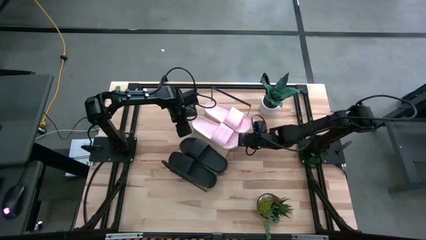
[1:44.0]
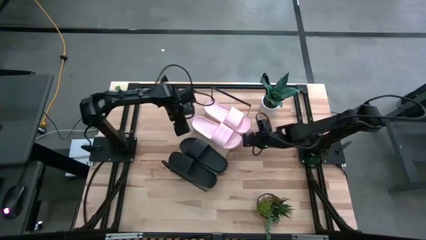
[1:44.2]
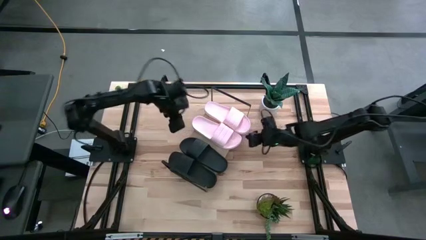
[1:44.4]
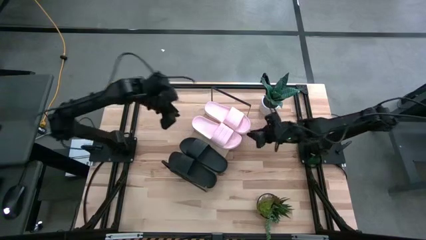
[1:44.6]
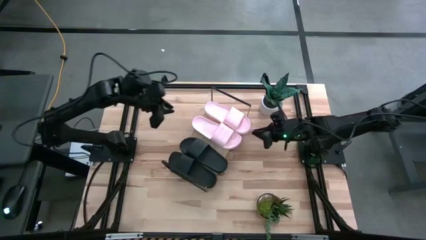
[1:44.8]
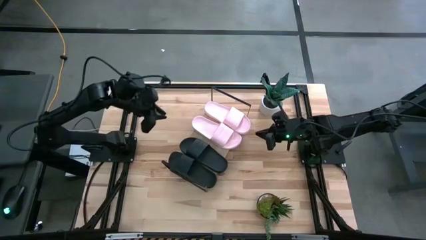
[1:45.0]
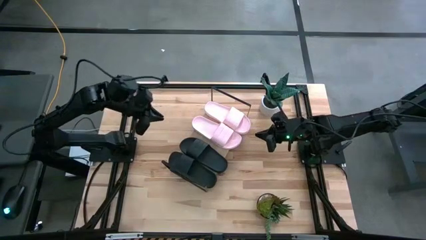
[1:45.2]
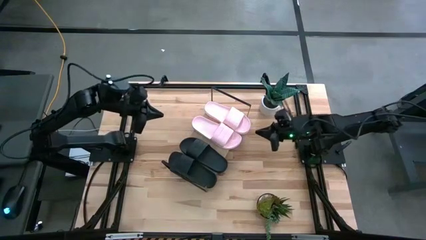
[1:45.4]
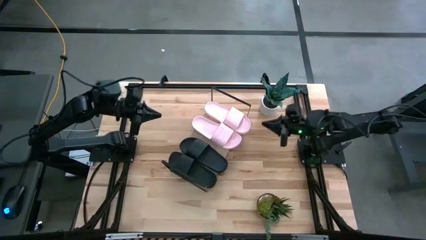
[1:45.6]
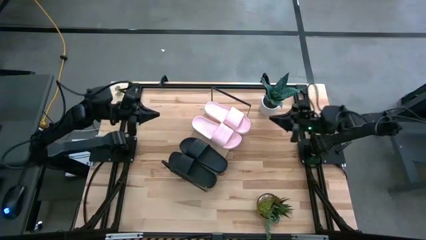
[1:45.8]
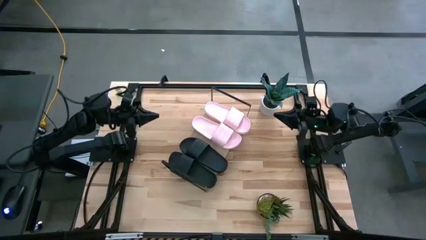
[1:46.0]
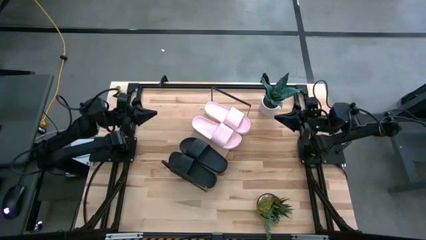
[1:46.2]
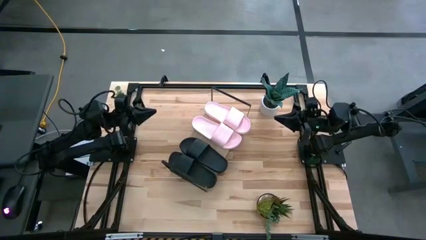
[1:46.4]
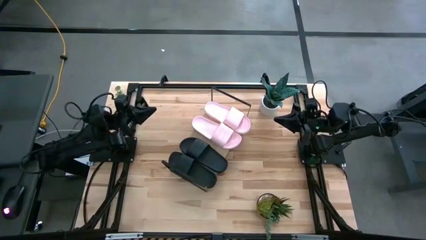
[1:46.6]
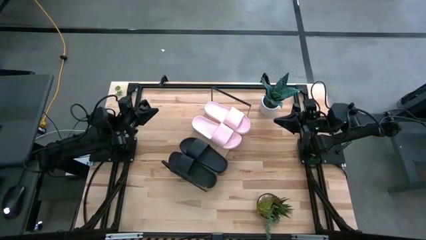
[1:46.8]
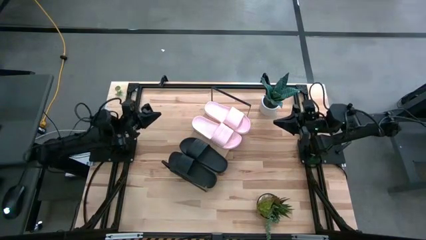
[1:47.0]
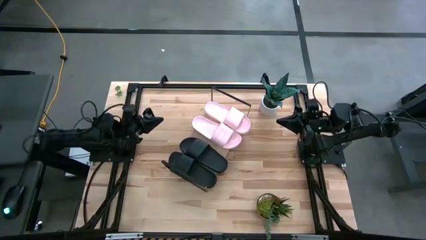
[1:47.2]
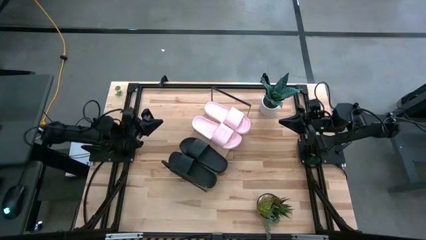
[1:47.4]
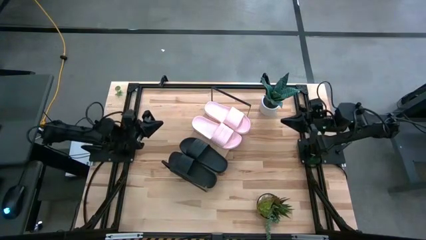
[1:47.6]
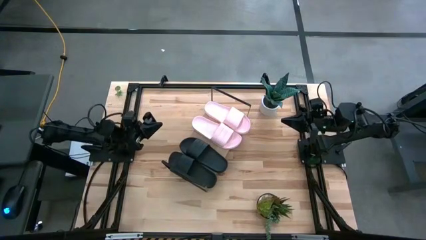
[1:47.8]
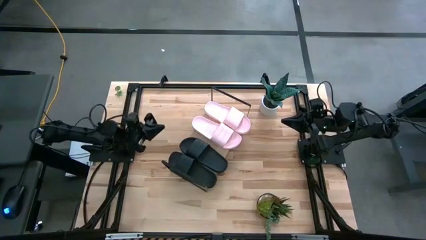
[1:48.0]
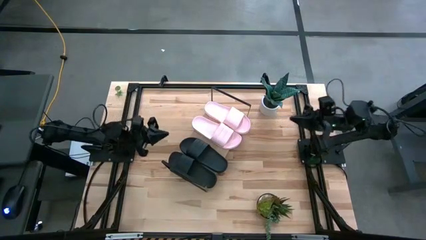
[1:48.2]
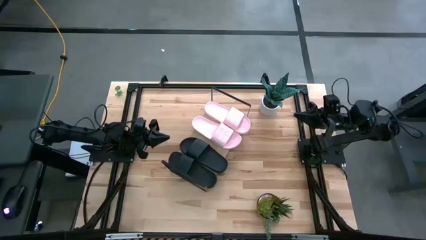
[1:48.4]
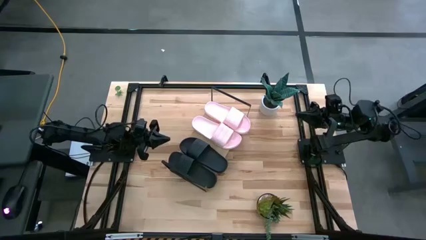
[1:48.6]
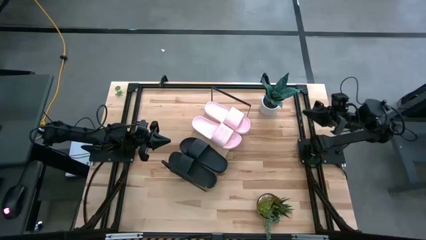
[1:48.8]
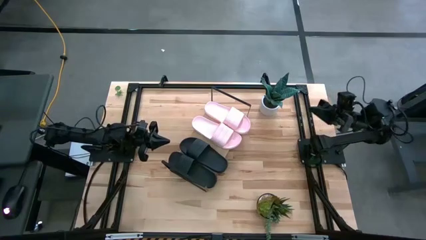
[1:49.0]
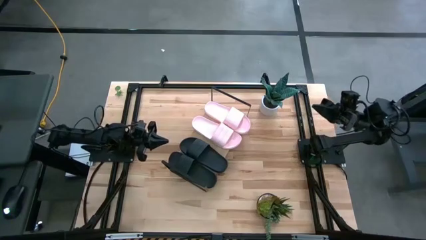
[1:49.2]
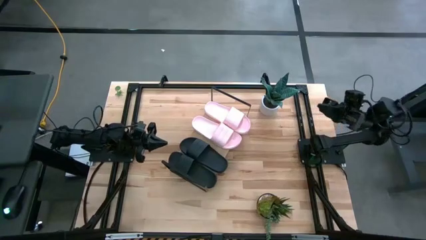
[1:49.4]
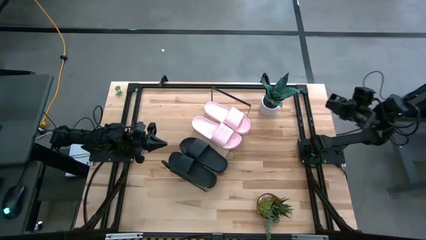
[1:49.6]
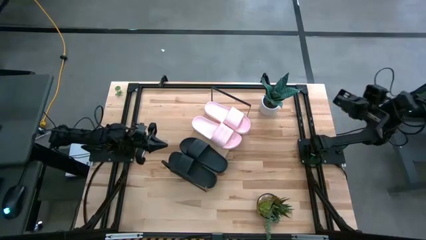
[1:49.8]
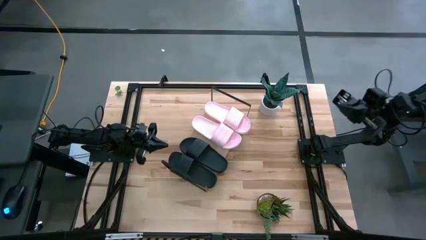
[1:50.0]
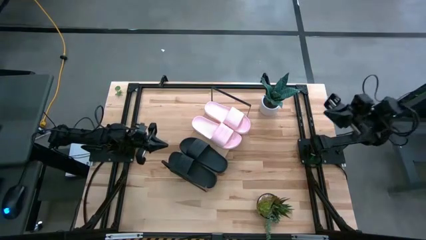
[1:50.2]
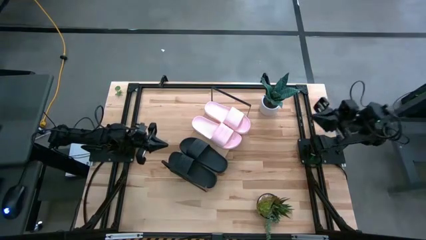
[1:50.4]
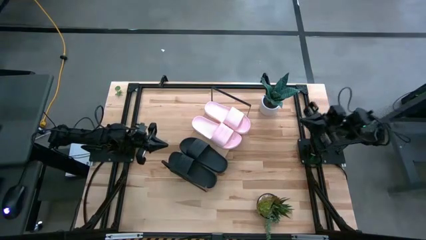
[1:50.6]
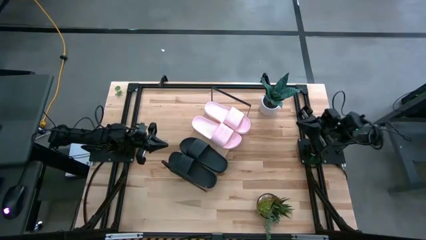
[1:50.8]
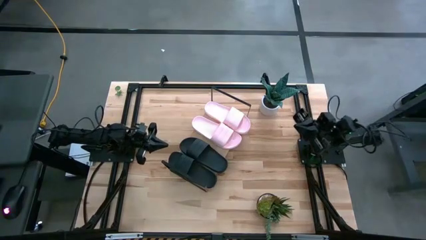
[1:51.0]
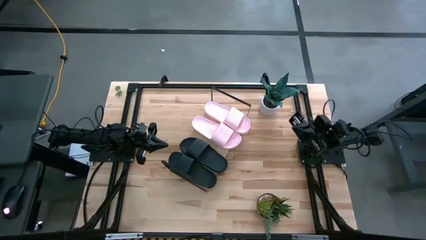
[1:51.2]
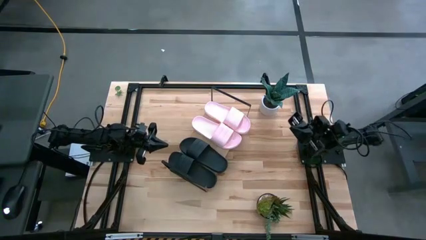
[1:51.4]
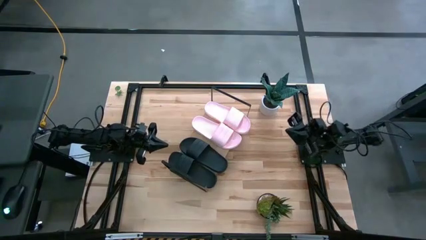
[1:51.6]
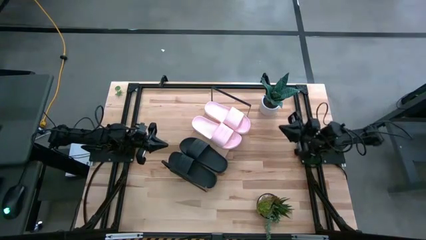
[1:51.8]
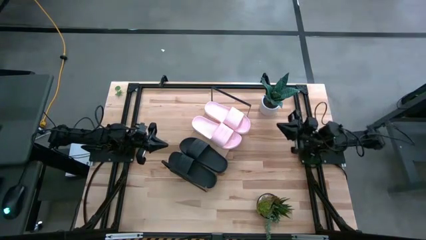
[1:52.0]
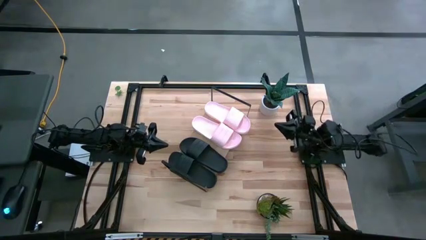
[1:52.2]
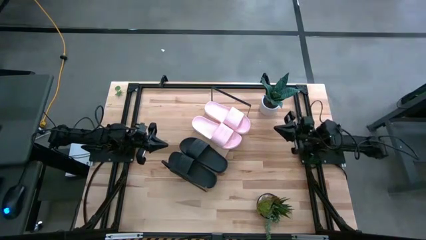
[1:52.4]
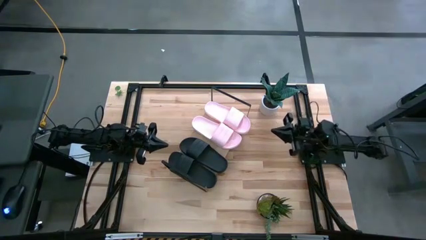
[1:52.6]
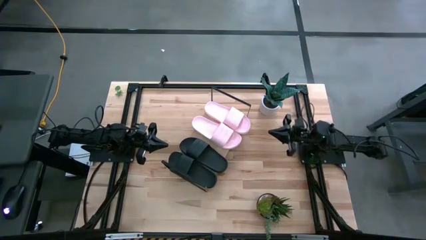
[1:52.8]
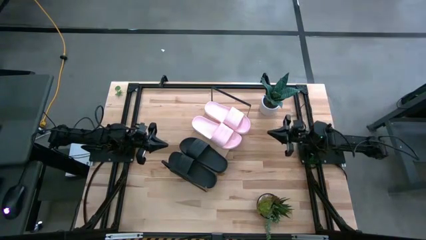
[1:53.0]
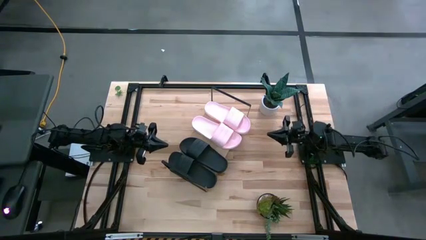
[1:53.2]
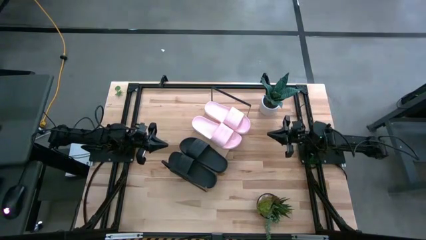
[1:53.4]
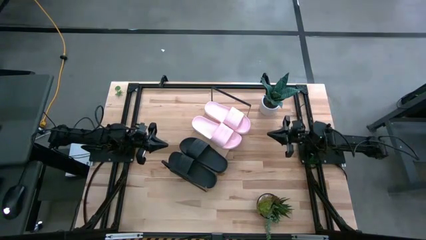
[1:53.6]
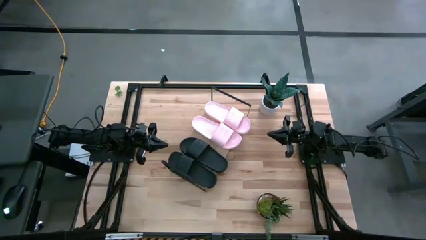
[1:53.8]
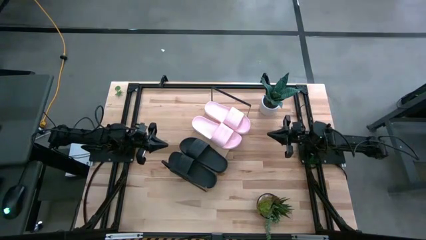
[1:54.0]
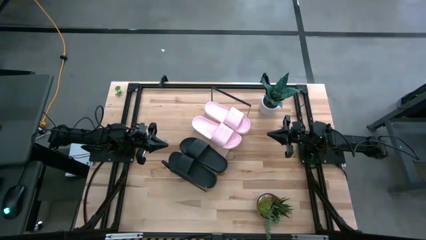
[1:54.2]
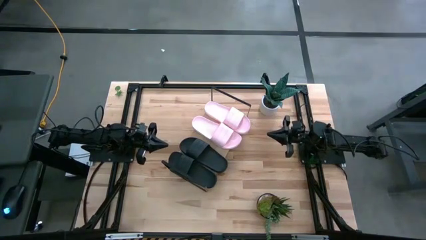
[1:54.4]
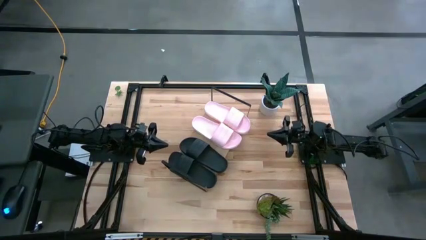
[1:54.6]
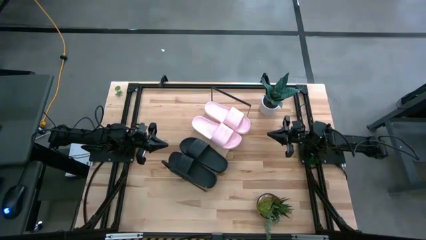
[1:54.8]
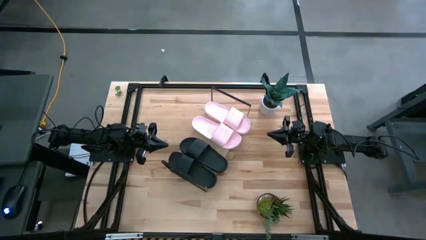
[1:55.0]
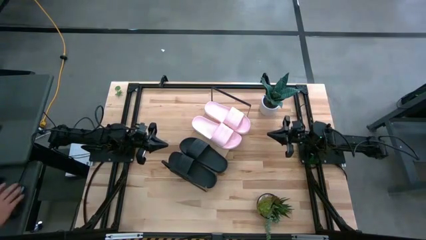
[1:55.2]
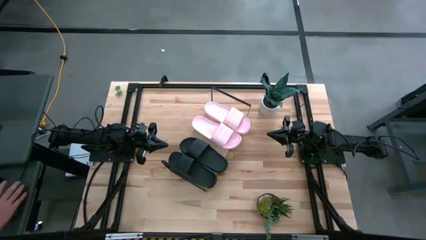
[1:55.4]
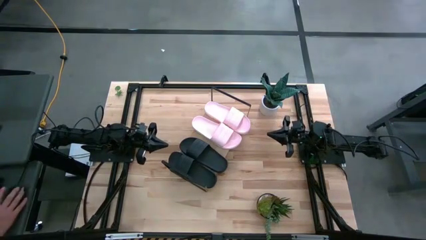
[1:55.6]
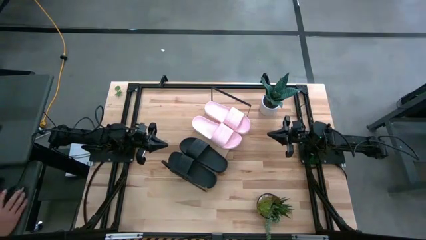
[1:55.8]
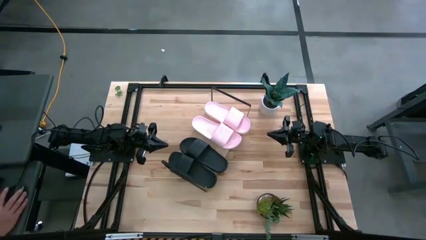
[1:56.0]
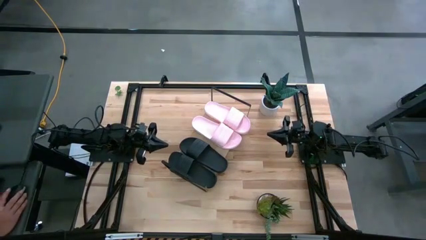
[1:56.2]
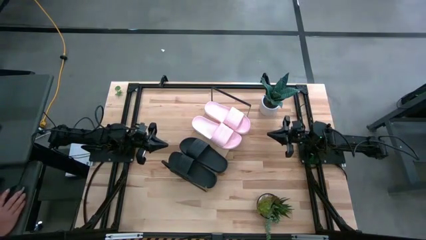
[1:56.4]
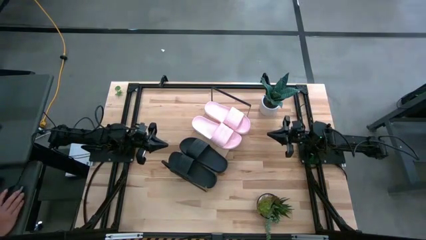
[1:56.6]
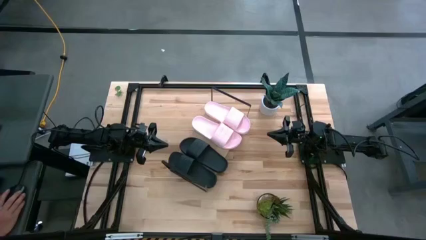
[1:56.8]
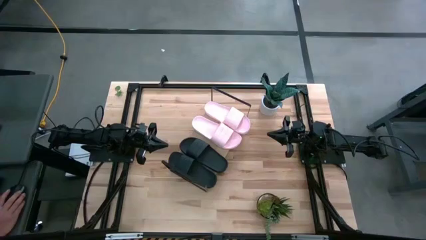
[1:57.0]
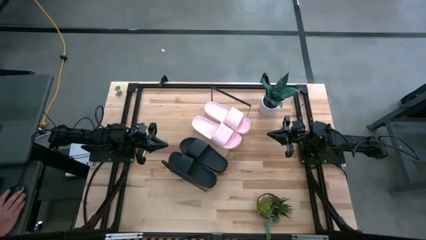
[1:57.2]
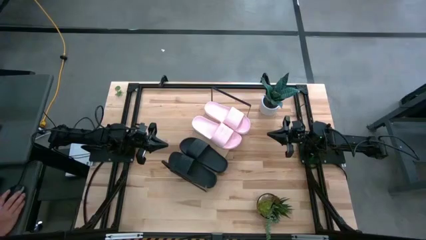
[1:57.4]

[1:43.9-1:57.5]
Task: Pick and place slides into the shelf
Return to Home Position
